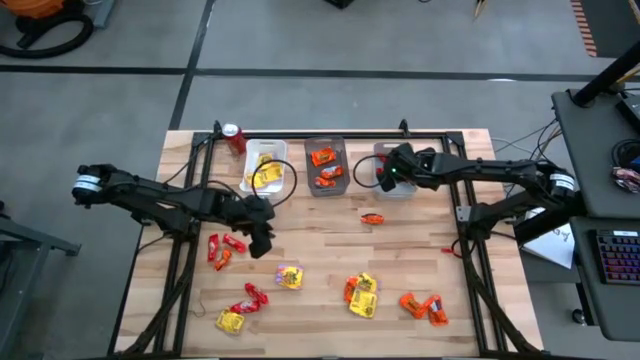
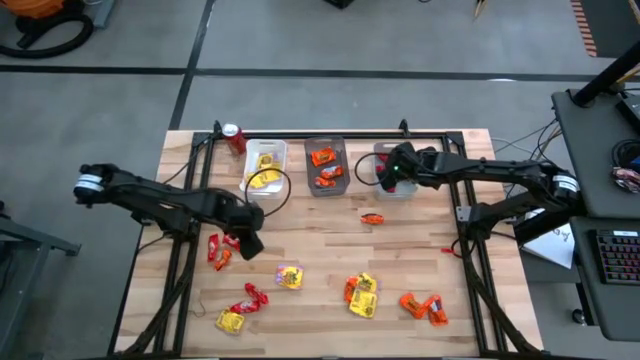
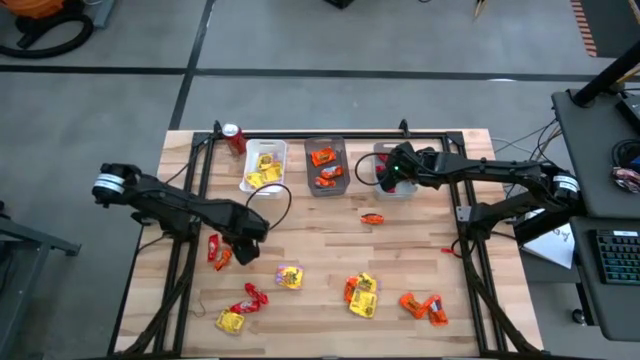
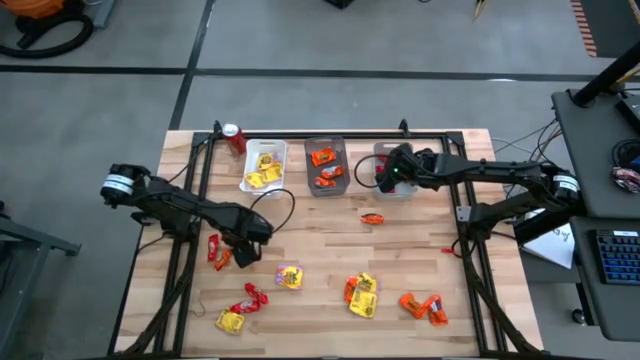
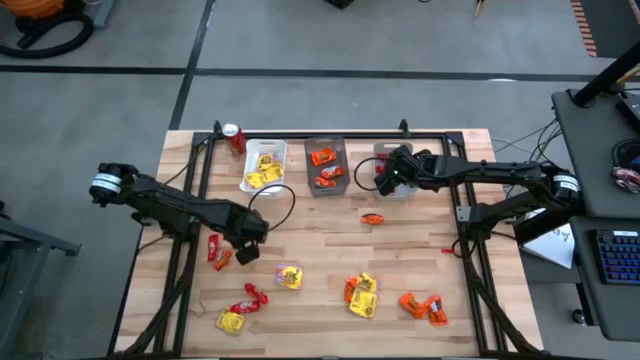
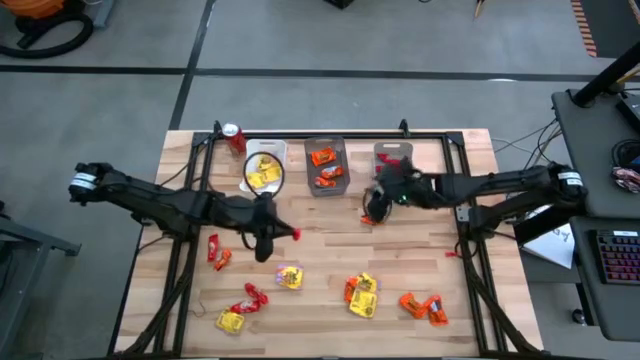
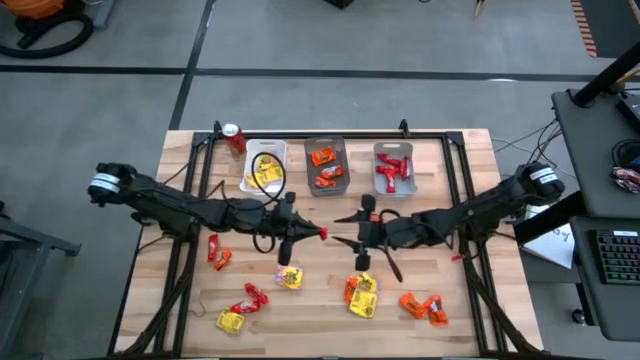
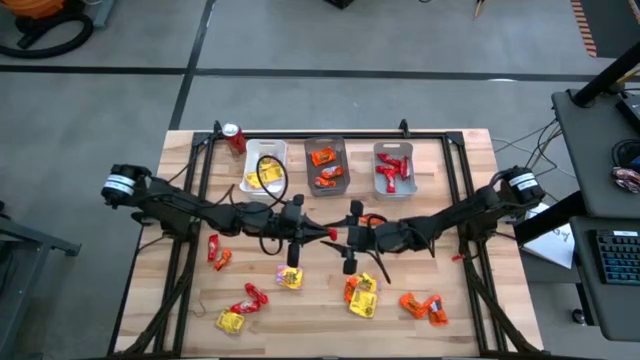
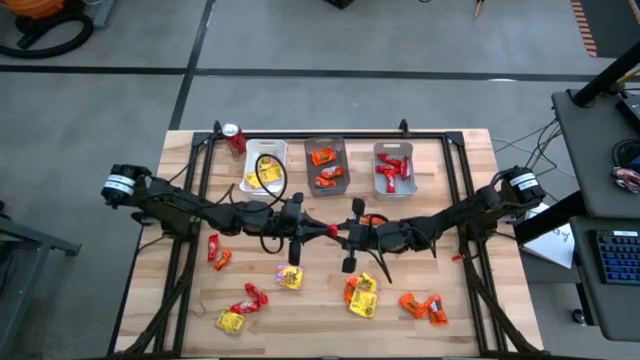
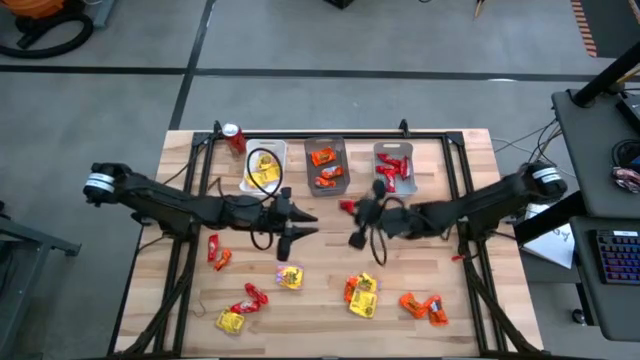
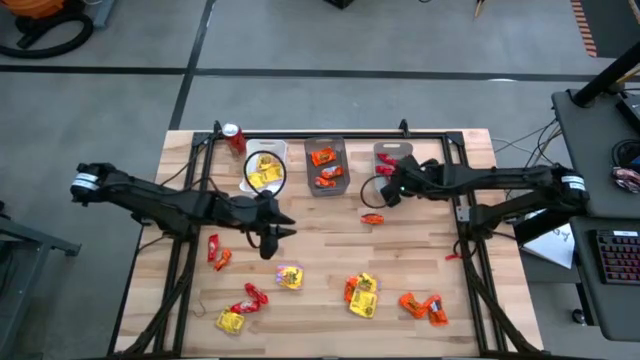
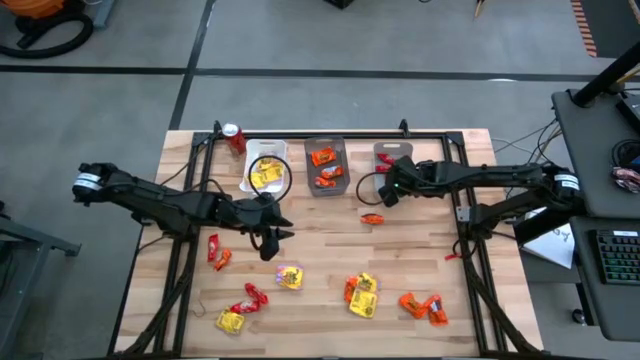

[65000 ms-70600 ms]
Task: Sort candy
Put the red chocolate into the gray bin

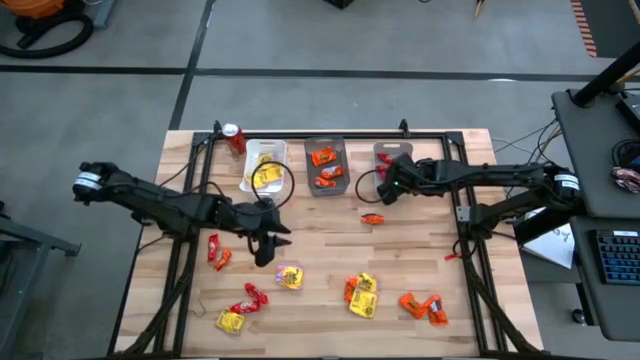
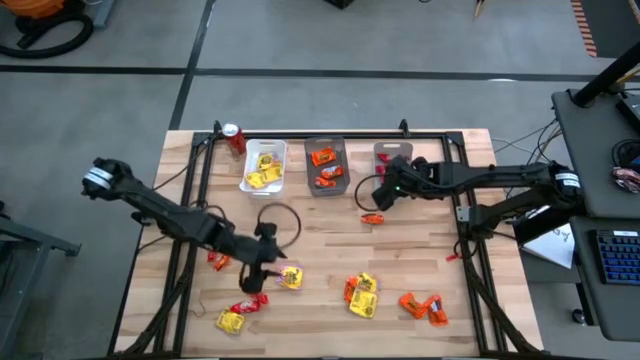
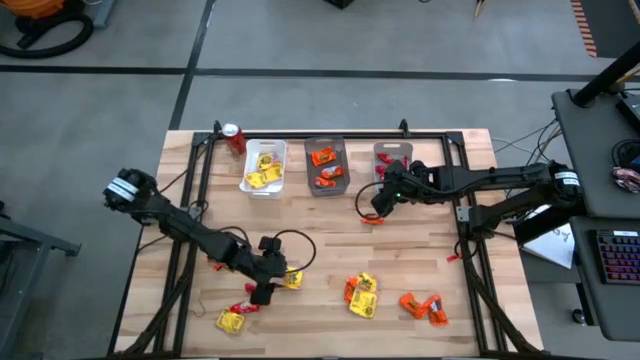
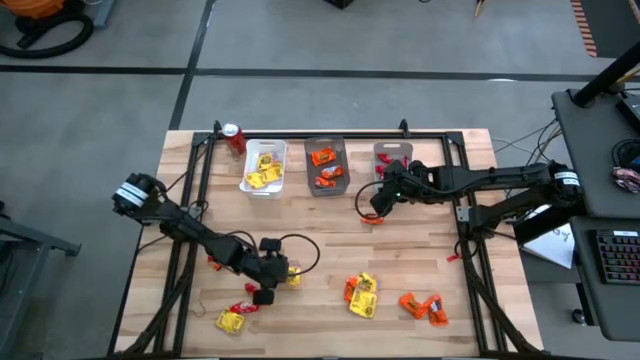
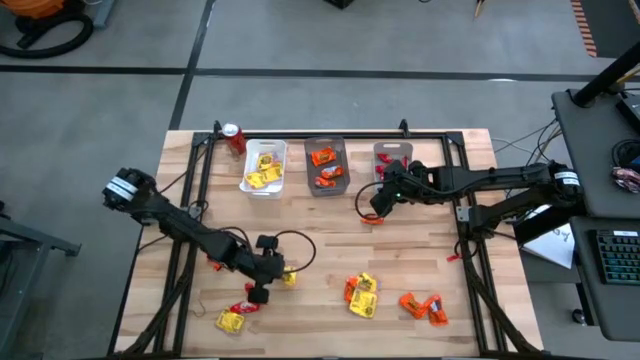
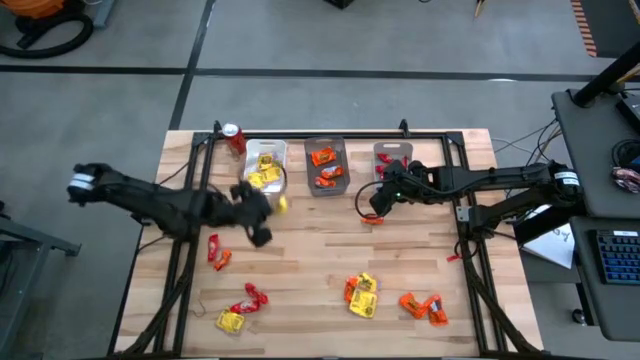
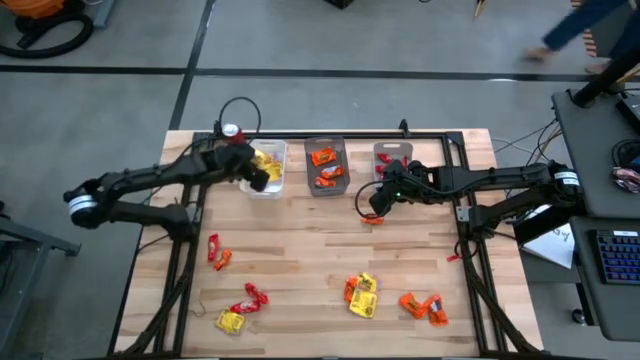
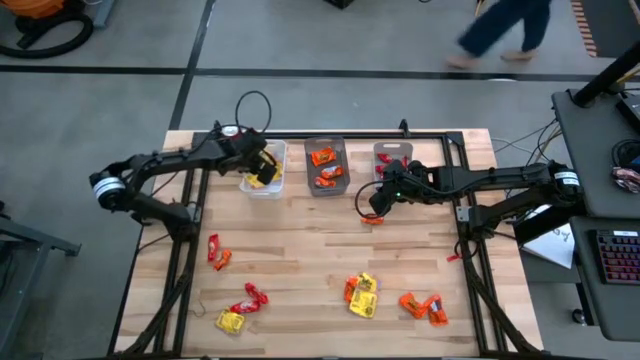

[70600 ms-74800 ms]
Put the yellow candy into the white bin

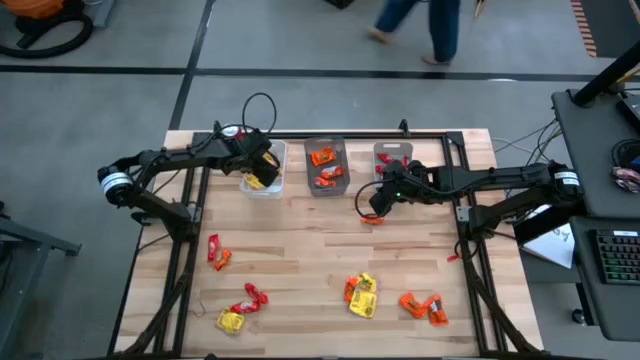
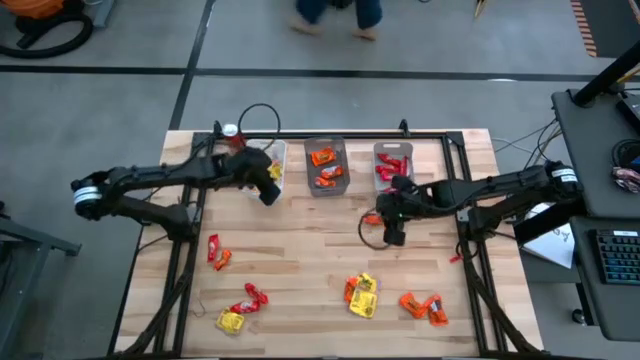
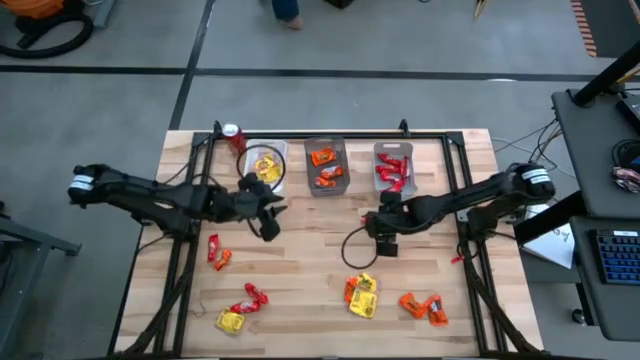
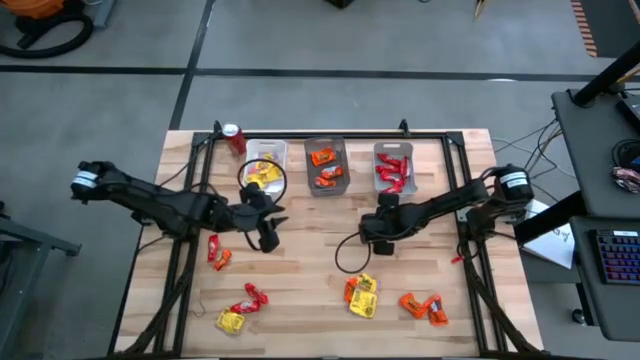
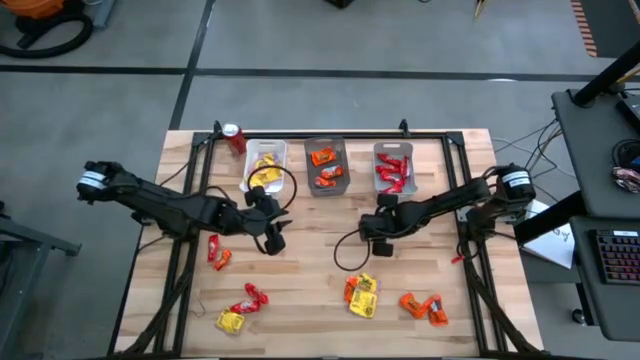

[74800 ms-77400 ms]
Put the orange chocolate into the black bin

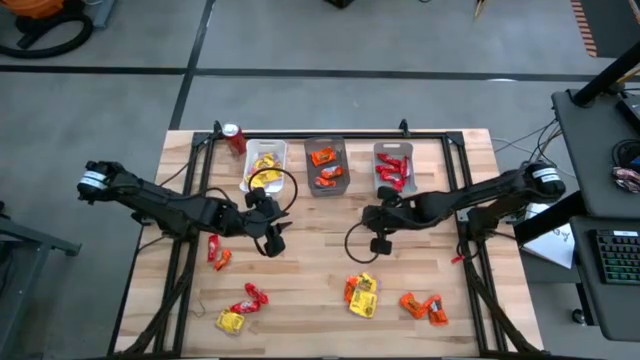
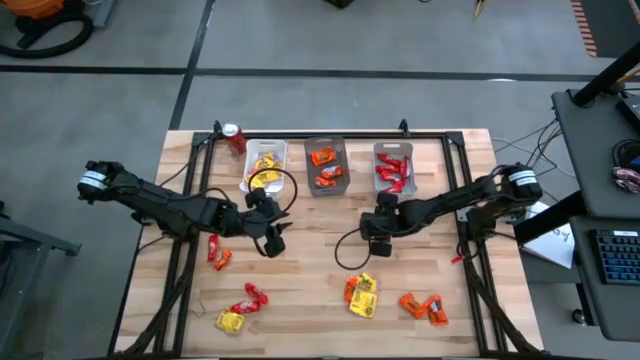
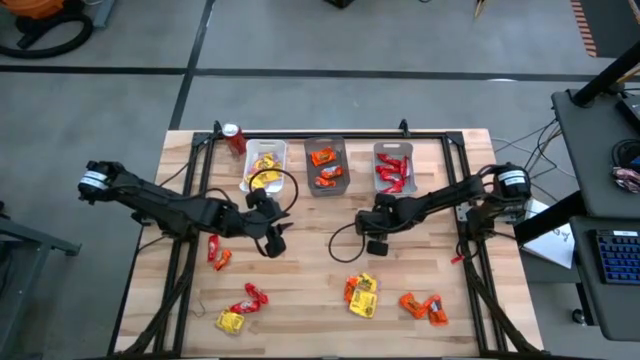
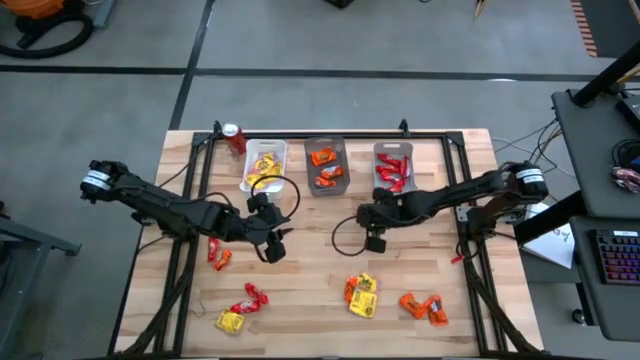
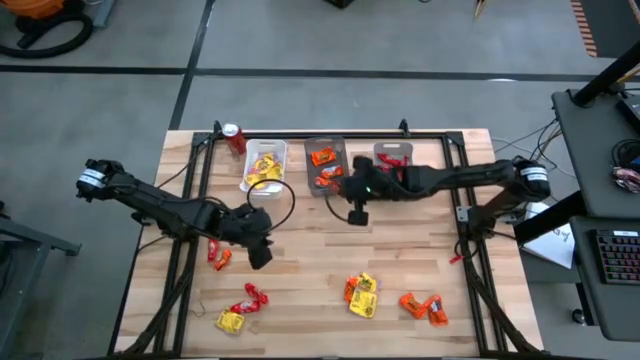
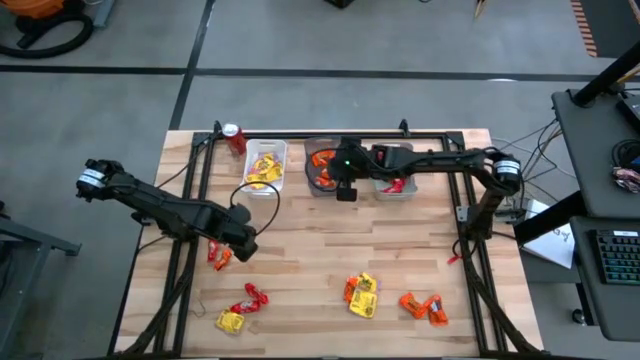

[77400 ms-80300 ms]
Put the orange chocolate into the black bin

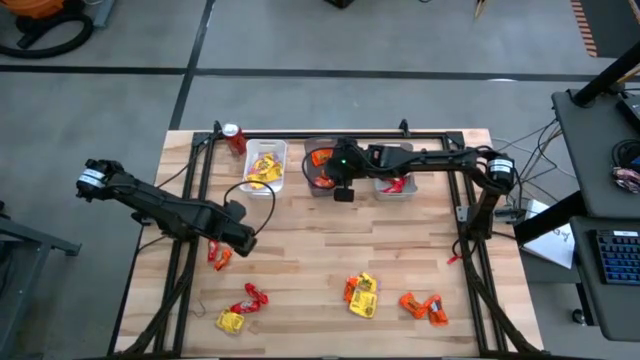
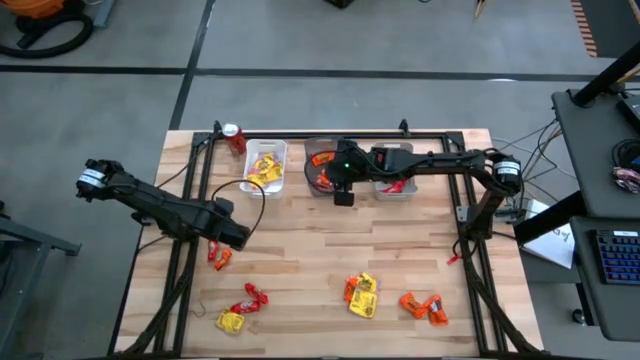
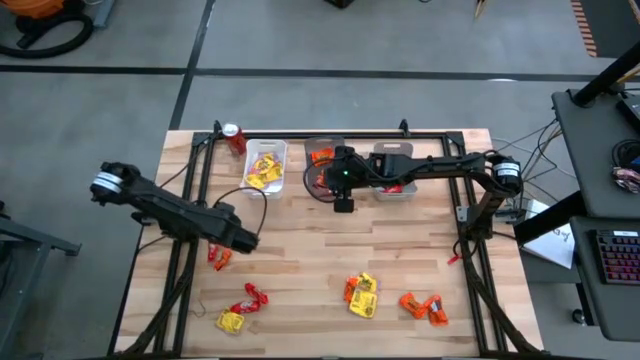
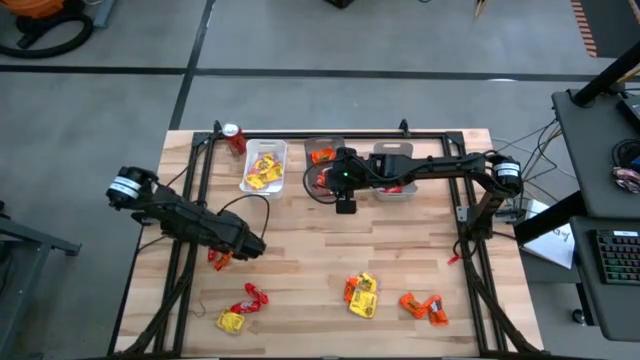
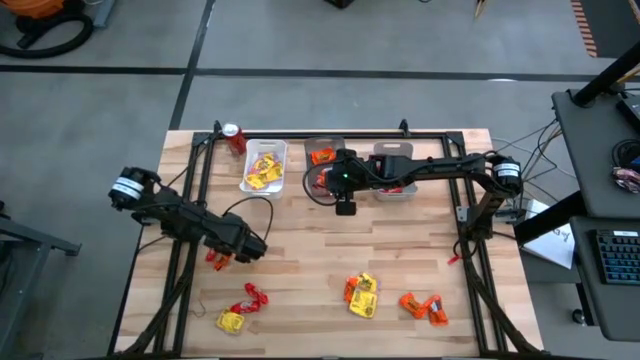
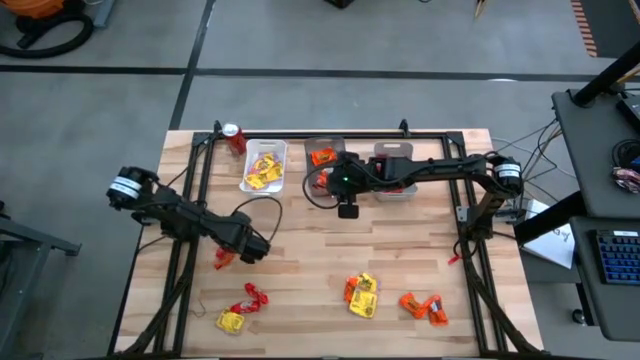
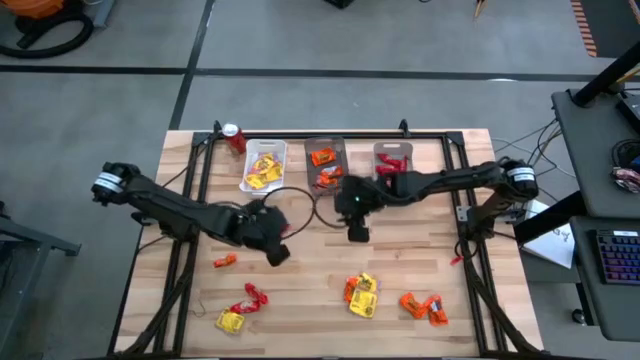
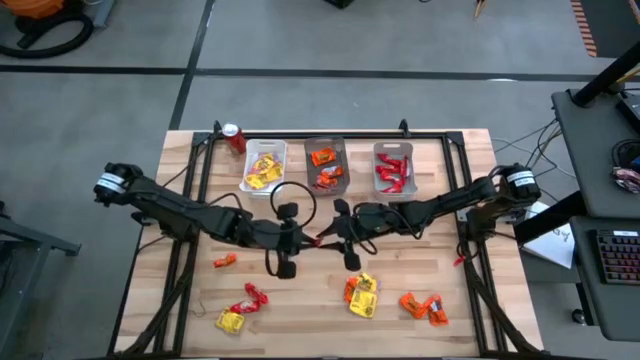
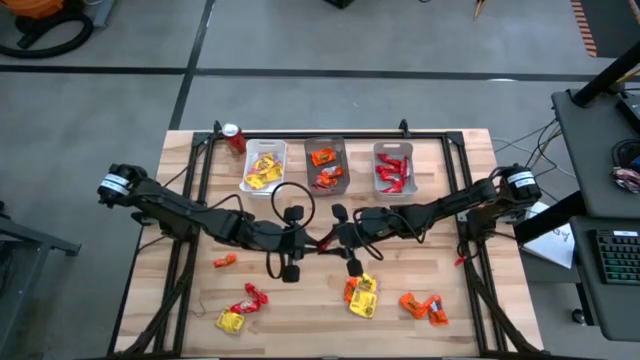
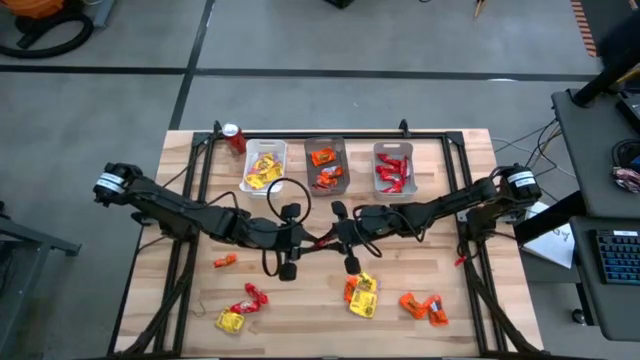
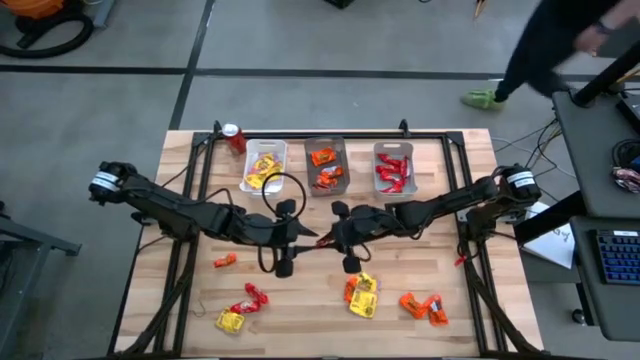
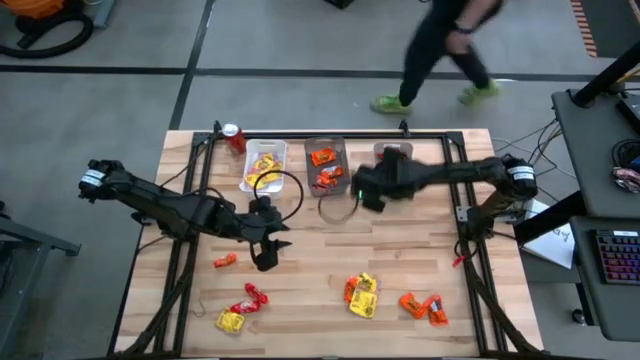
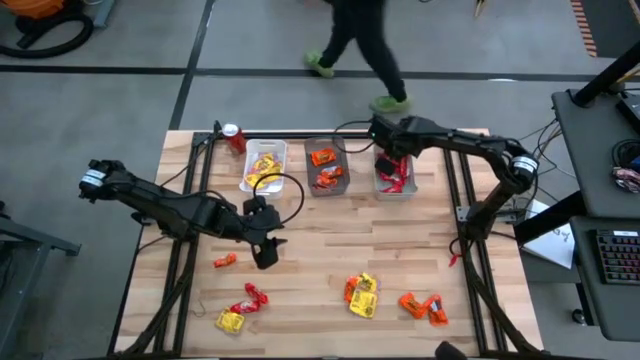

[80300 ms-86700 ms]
Put the red chocolate into the gray bin
